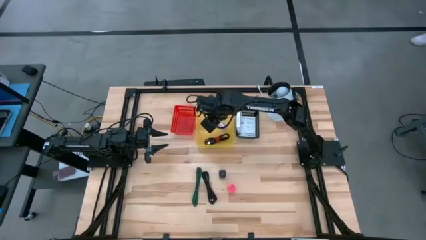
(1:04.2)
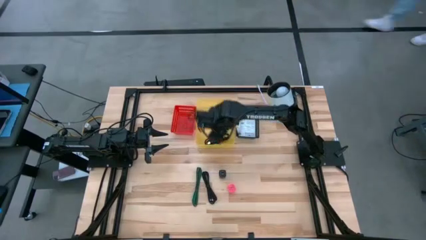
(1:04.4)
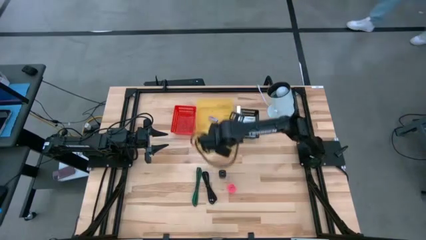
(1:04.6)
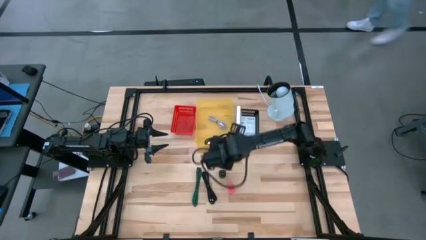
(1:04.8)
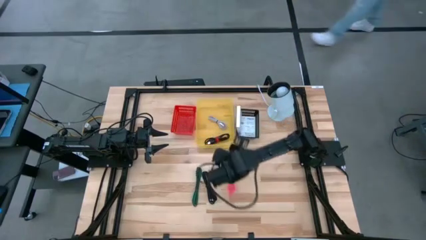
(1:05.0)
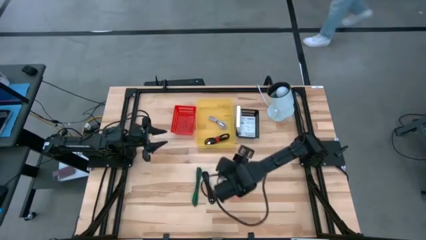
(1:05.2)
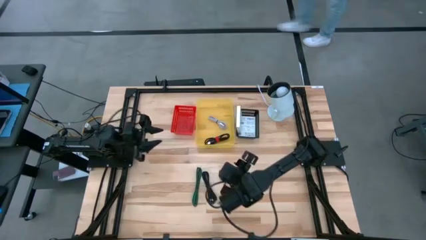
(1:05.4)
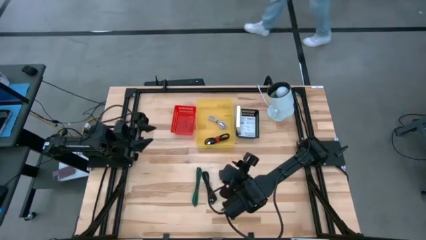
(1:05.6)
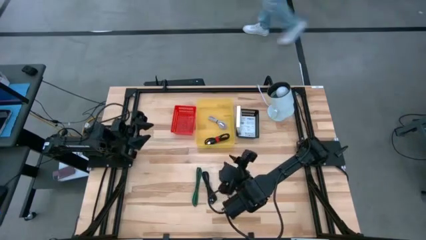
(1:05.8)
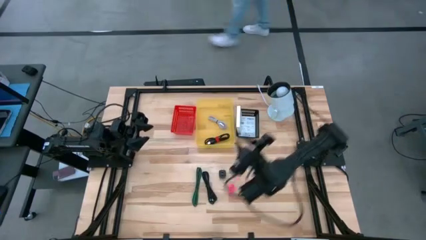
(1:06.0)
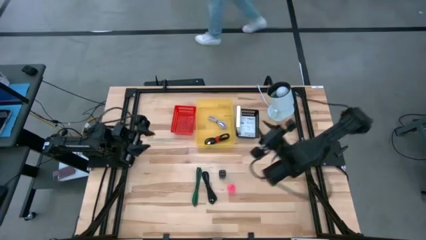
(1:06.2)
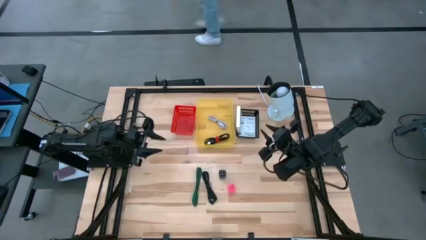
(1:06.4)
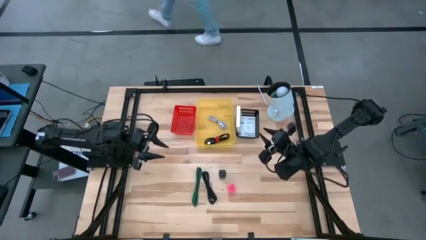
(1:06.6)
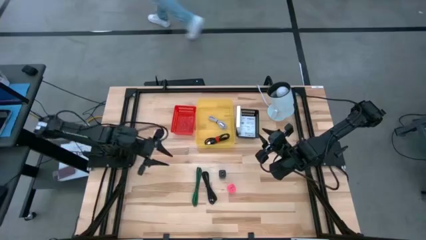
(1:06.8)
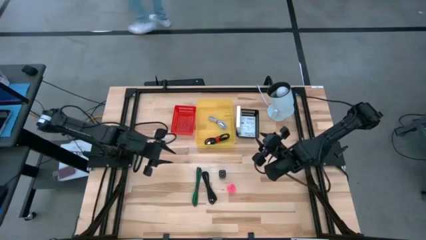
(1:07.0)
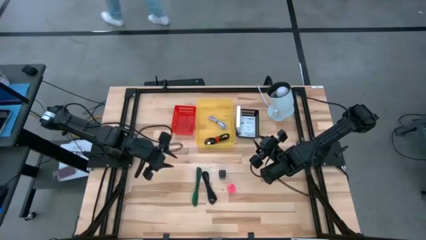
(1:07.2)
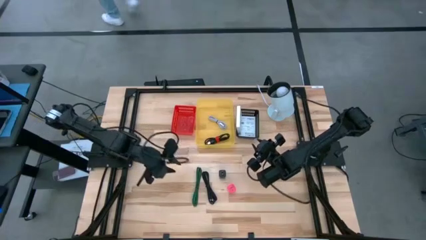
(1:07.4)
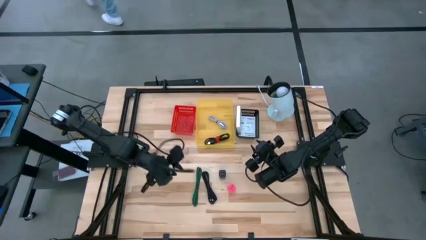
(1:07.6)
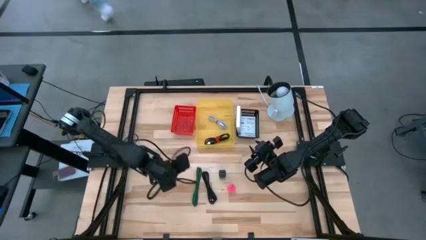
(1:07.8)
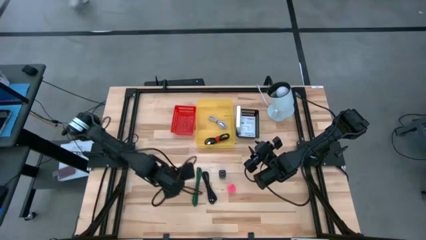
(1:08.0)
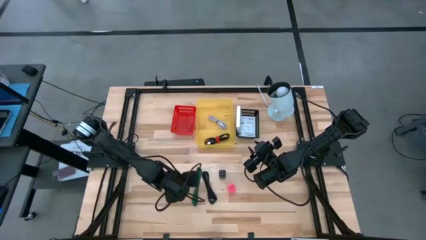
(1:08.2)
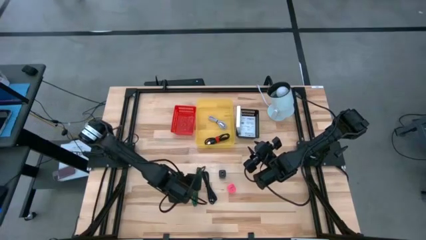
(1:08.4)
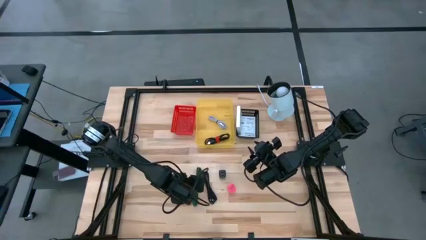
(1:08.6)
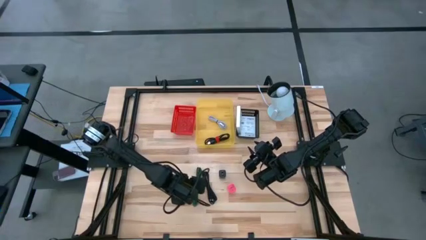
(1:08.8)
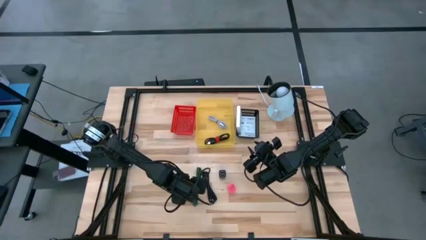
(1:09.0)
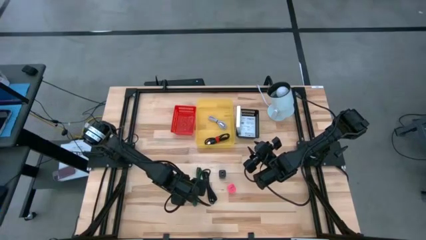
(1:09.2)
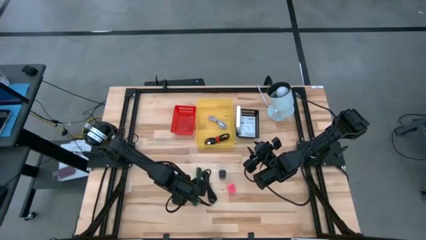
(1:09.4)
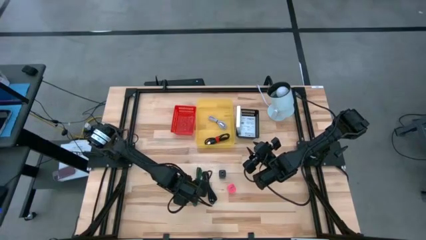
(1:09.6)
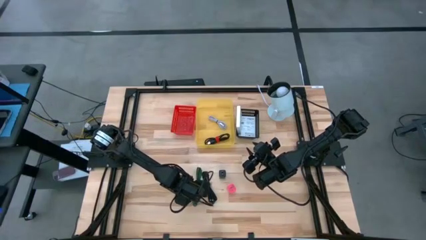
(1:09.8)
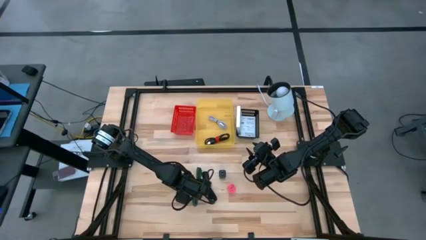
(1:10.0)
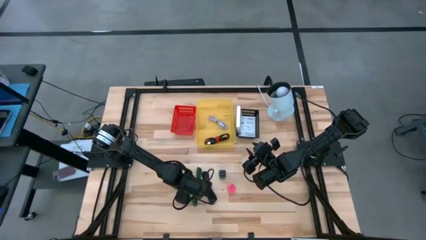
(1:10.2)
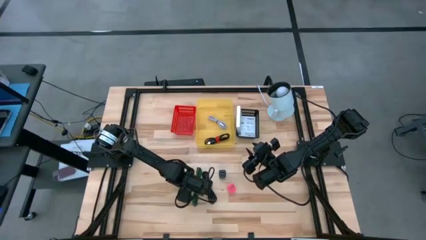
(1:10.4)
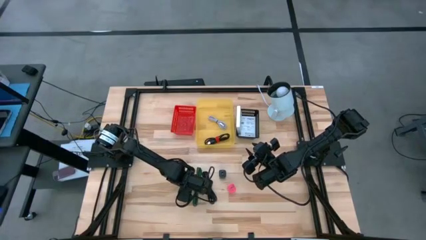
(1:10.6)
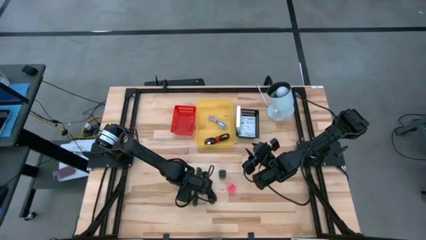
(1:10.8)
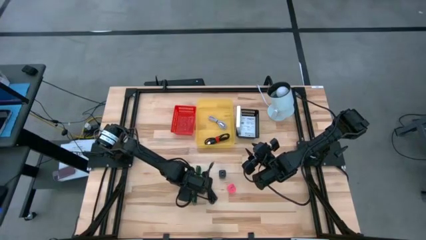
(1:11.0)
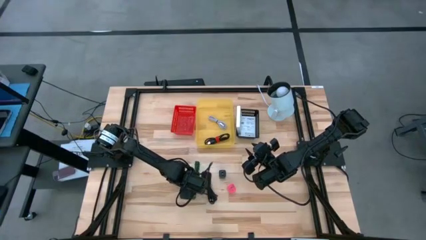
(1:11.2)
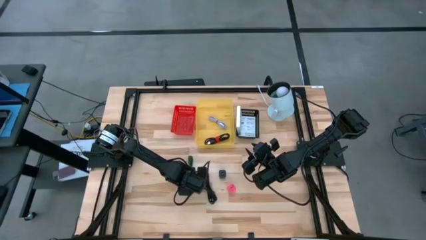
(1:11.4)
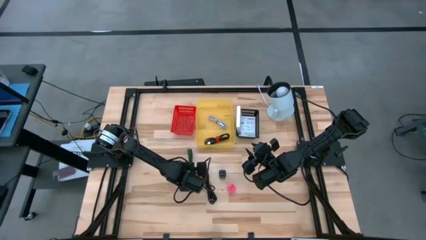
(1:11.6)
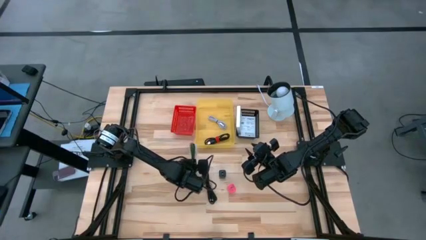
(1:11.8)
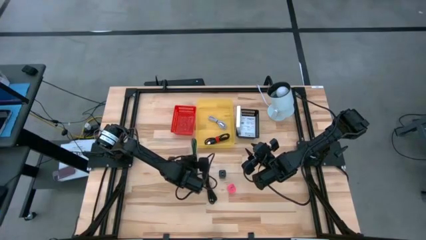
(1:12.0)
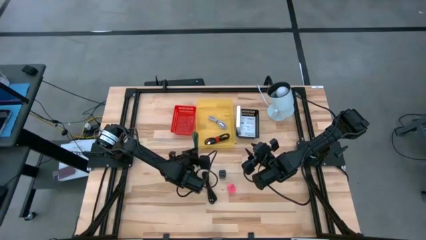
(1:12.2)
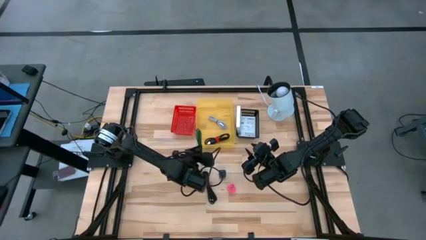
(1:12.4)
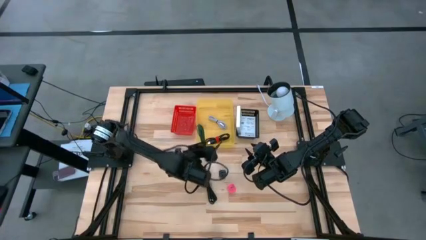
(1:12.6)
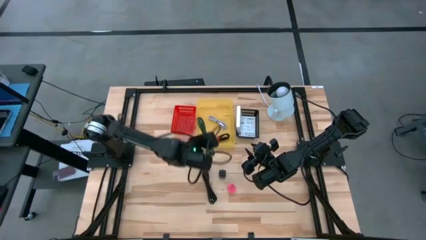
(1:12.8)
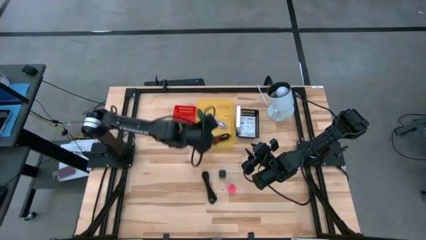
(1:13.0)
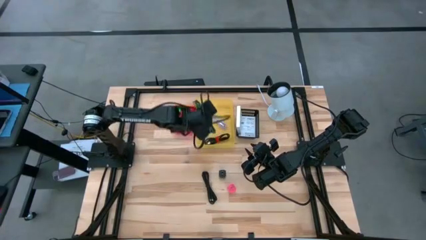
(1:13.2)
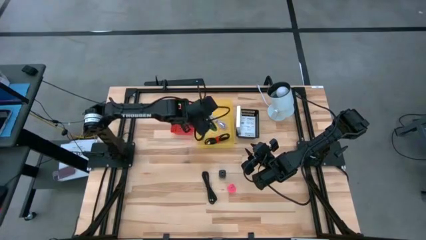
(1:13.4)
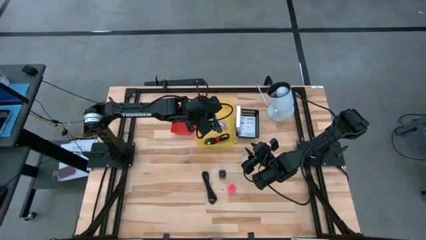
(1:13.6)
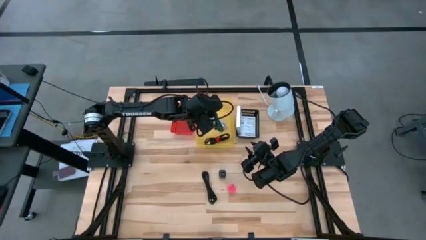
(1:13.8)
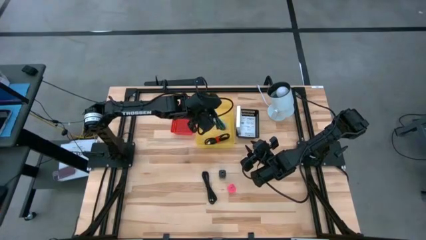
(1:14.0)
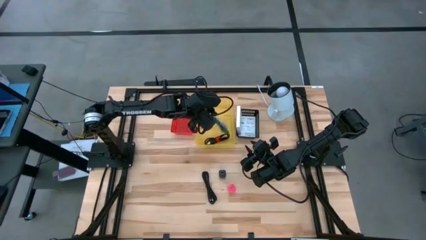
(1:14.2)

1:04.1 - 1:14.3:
Task: Pick and place items into bin
Put the green charger cable into the yellow bin

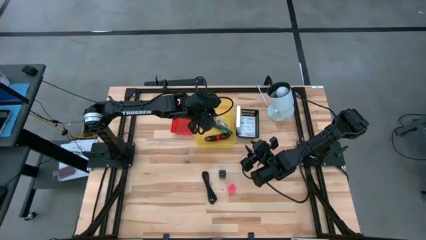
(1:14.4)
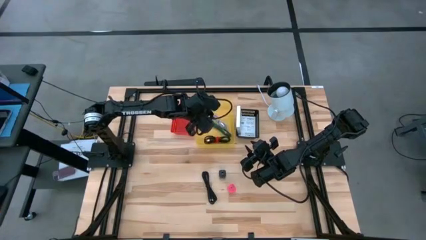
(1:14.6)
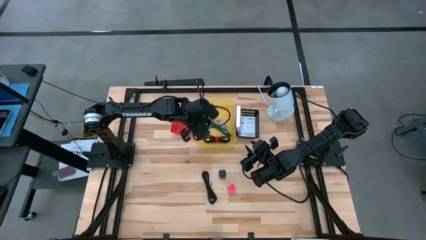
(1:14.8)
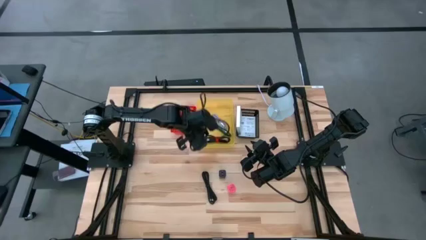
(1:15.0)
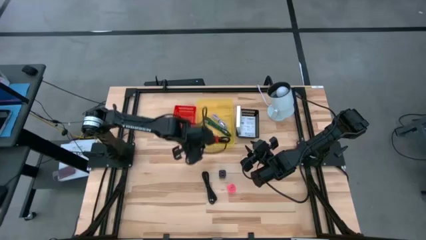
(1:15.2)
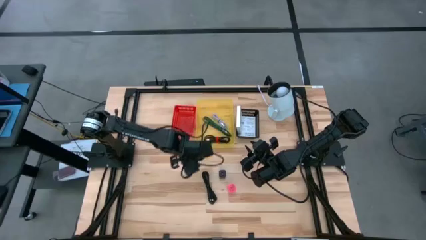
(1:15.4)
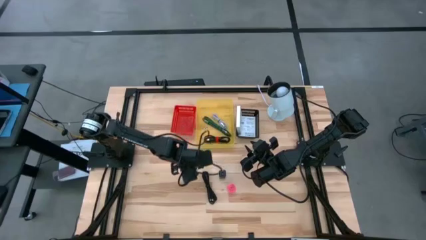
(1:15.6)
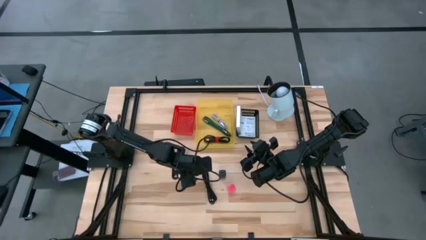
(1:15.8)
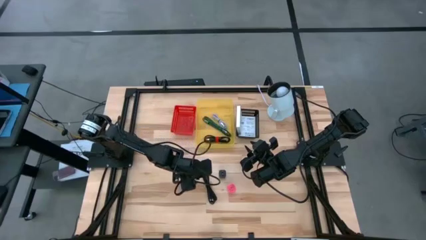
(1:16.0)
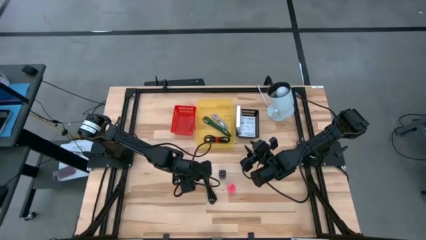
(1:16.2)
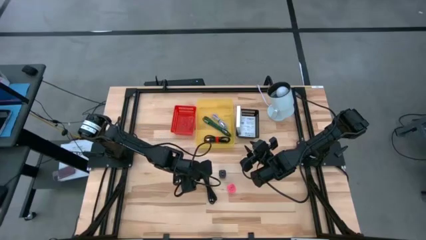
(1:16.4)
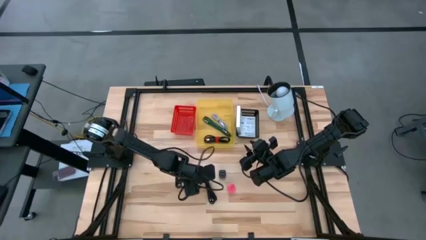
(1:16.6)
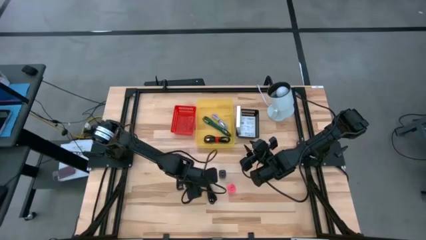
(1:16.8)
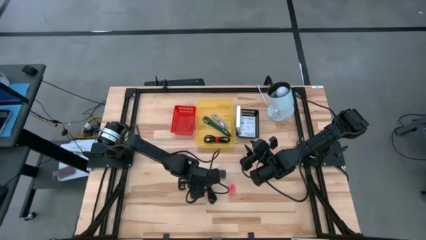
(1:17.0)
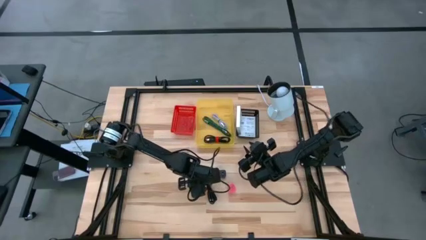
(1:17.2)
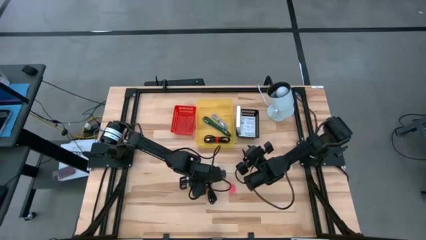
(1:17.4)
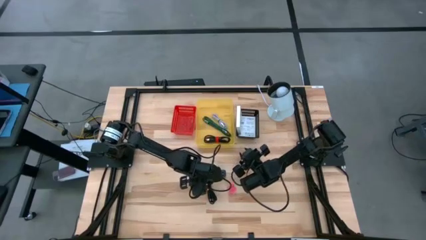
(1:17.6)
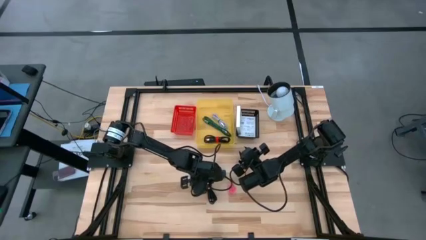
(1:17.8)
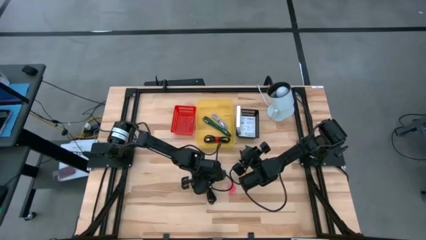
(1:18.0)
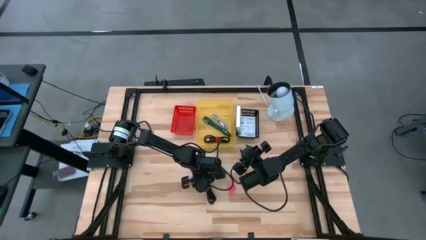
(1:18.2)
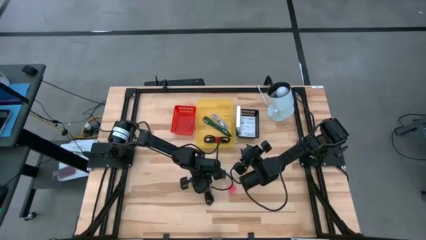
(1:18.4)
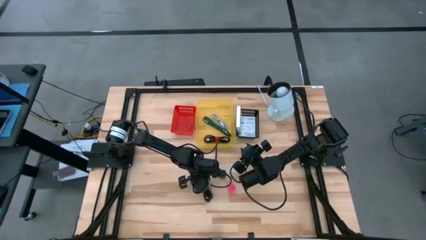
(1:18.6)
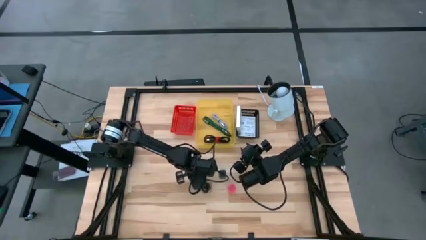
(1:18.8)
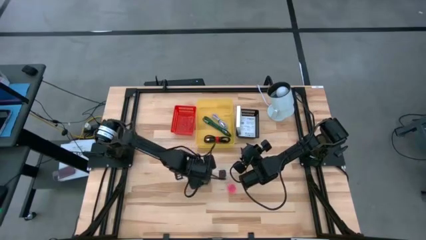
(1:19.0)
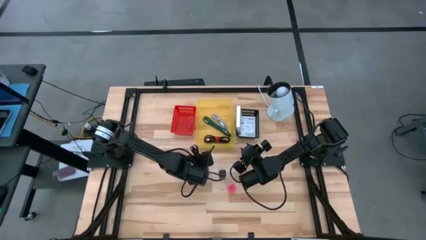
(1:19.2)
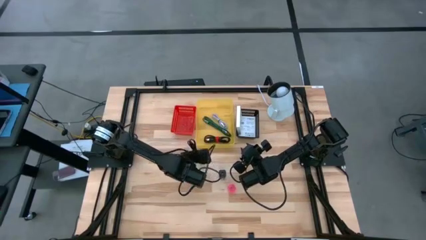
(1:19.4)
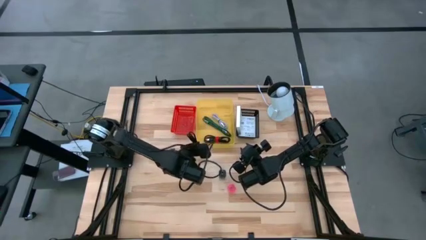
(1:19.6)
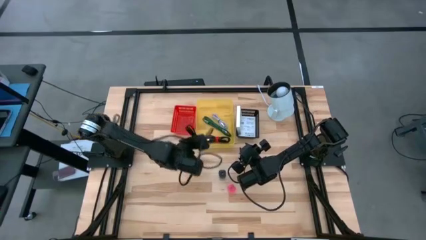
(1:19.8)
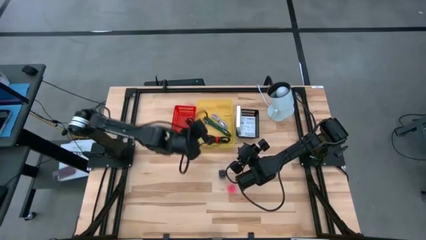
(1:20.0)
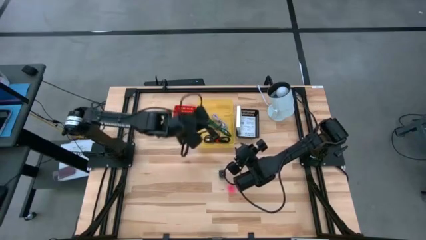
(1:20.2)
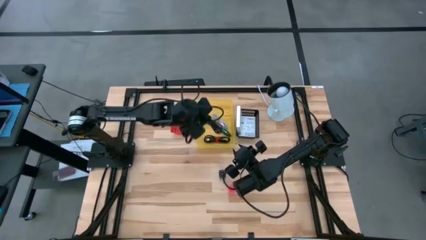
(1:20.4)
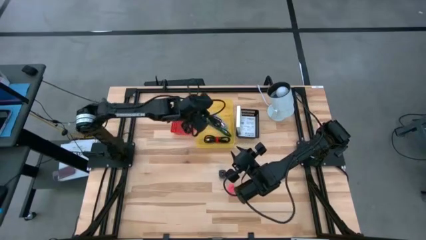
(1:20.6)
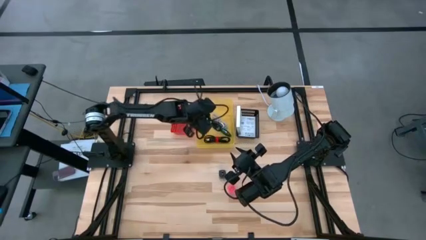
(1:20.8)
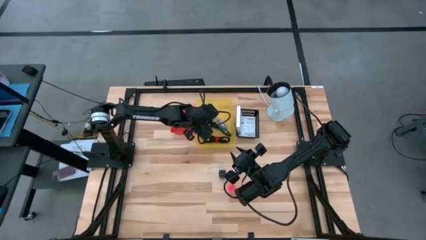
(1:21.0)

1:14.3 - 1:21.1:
Put the black charger cable into the yellow bin
